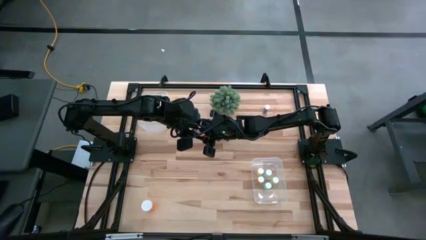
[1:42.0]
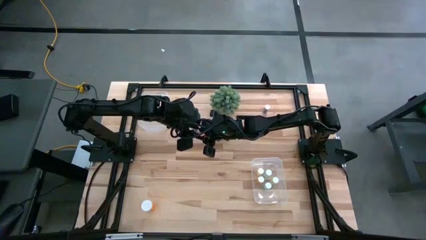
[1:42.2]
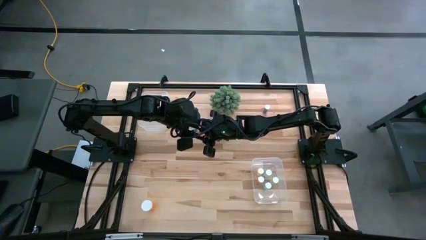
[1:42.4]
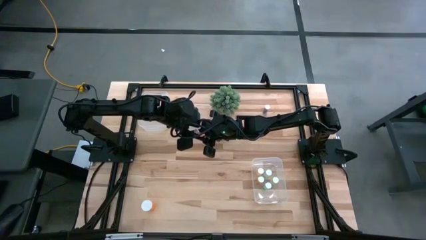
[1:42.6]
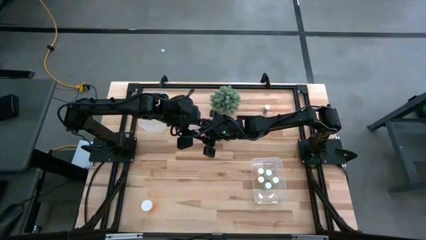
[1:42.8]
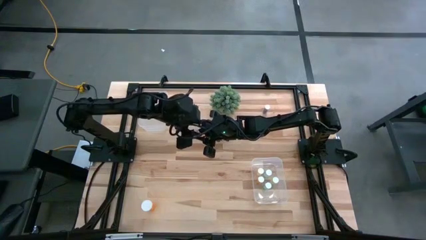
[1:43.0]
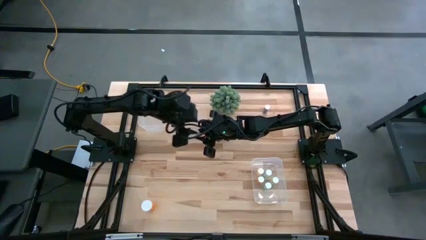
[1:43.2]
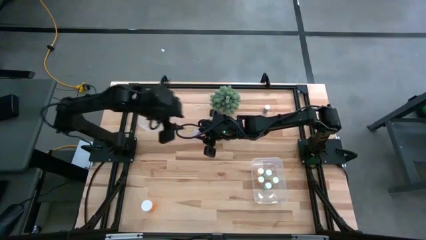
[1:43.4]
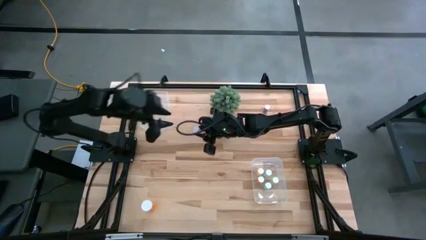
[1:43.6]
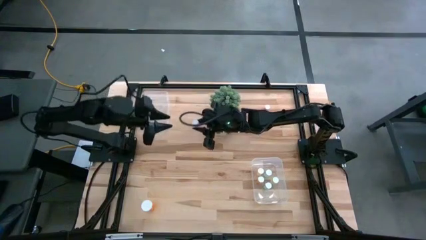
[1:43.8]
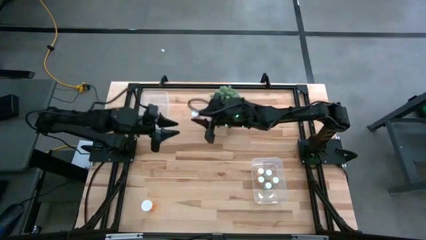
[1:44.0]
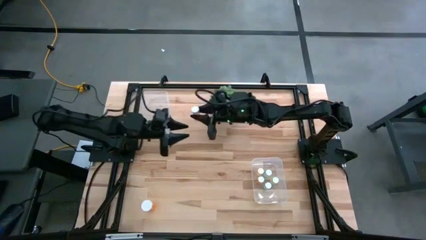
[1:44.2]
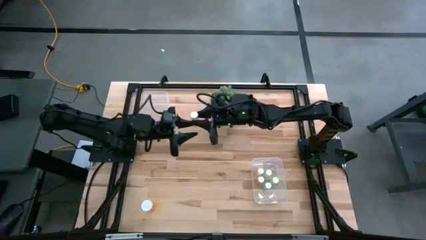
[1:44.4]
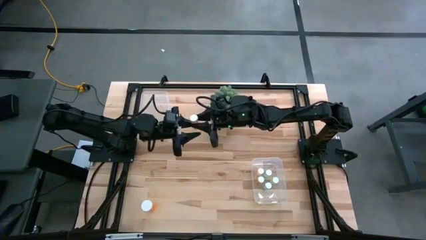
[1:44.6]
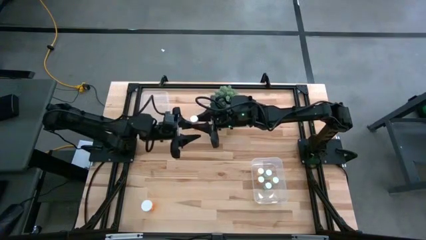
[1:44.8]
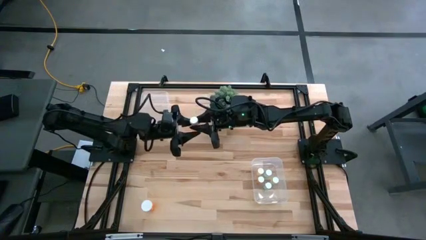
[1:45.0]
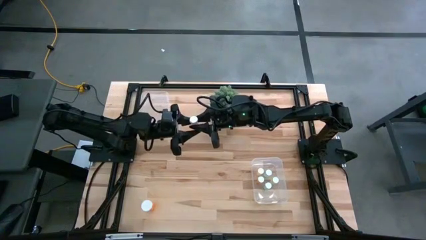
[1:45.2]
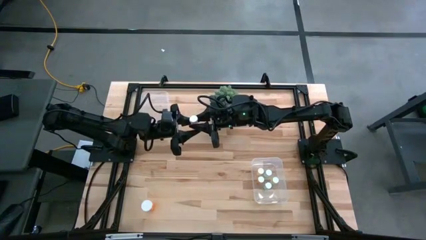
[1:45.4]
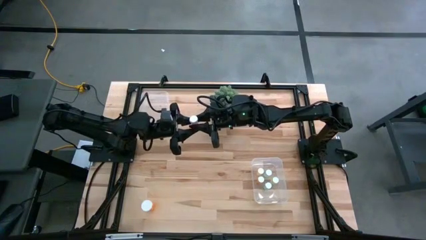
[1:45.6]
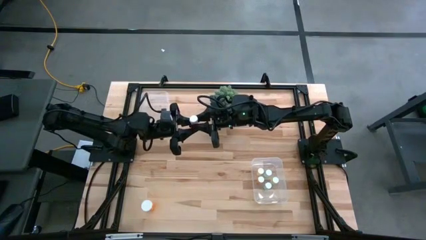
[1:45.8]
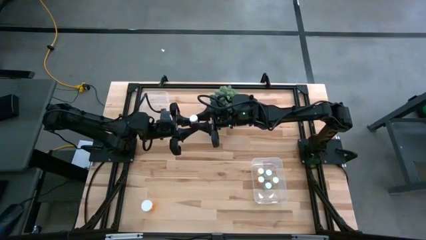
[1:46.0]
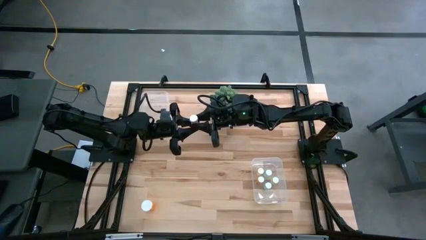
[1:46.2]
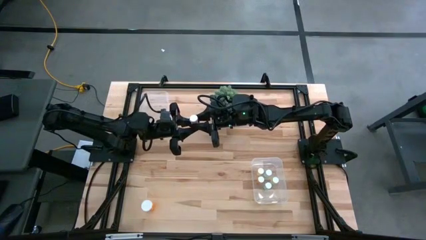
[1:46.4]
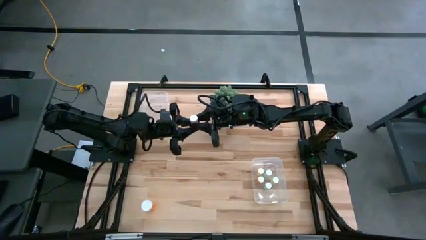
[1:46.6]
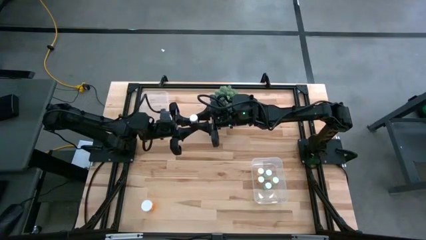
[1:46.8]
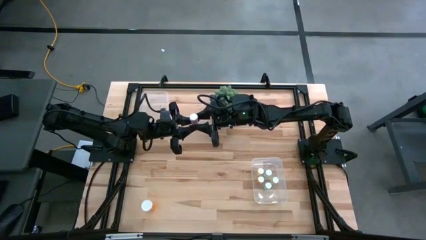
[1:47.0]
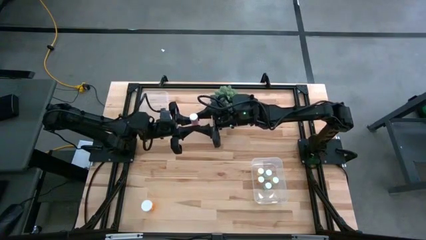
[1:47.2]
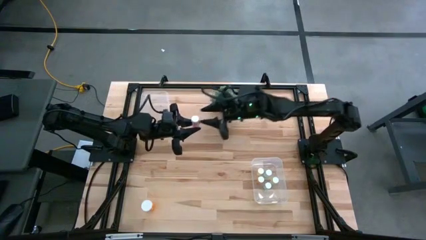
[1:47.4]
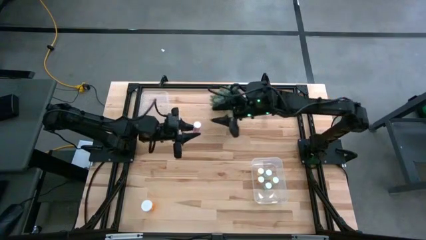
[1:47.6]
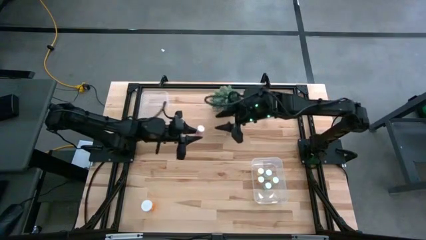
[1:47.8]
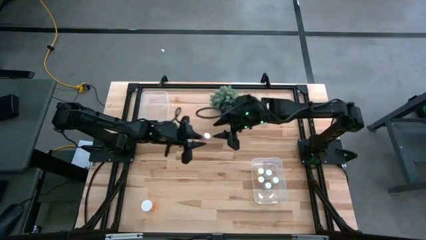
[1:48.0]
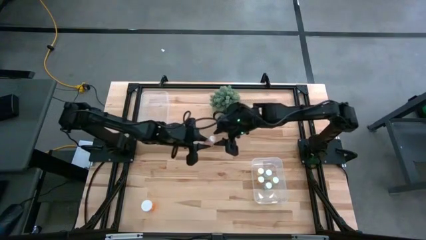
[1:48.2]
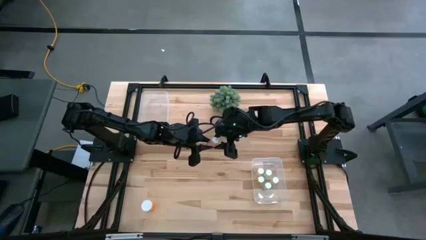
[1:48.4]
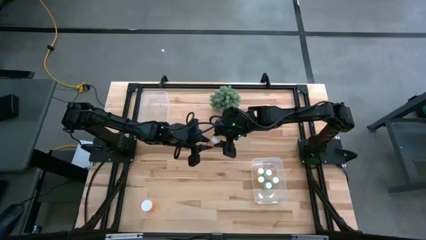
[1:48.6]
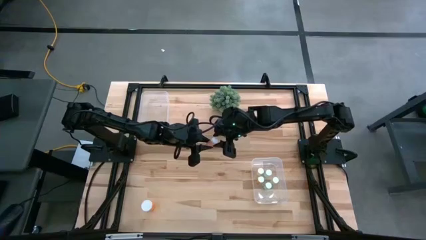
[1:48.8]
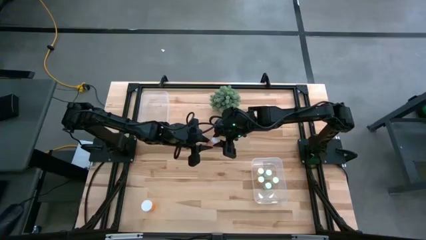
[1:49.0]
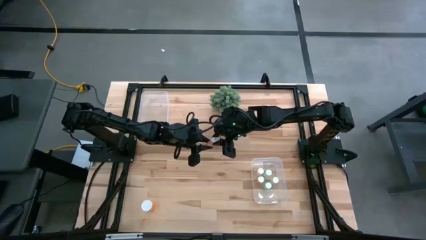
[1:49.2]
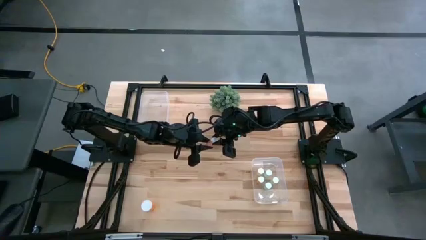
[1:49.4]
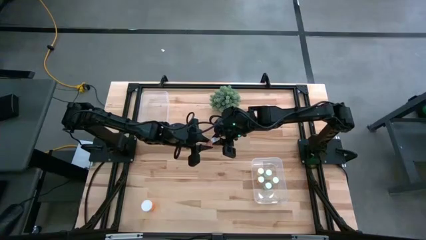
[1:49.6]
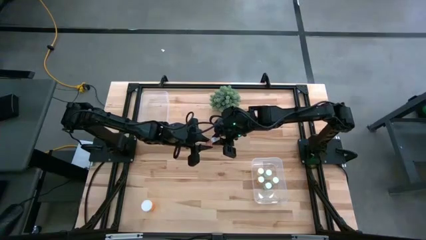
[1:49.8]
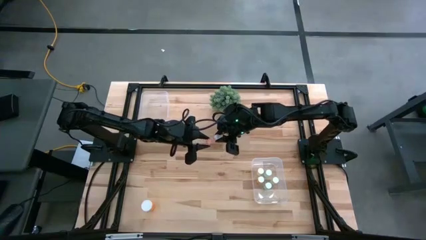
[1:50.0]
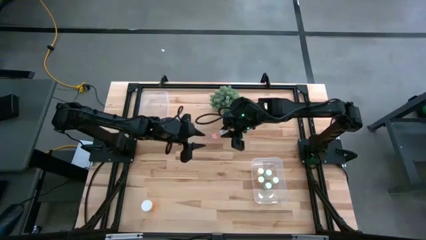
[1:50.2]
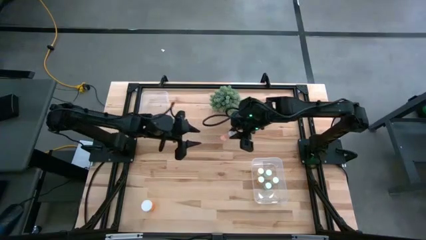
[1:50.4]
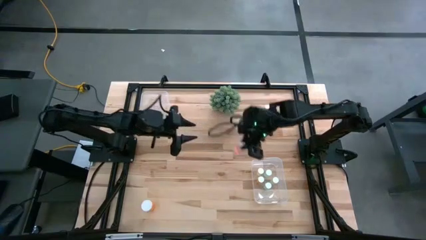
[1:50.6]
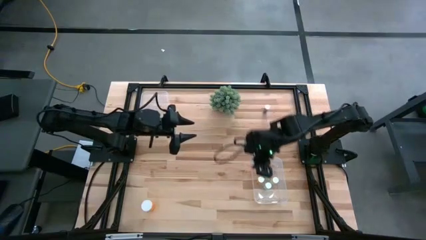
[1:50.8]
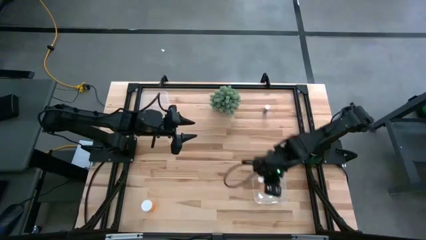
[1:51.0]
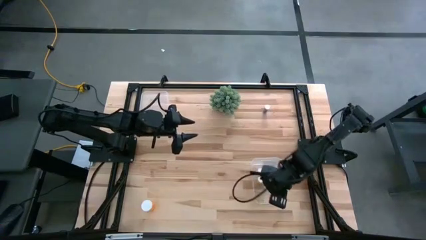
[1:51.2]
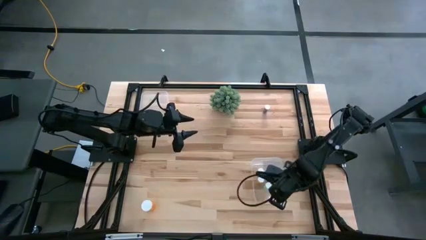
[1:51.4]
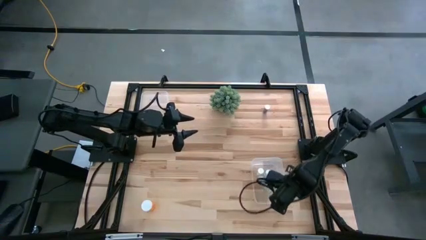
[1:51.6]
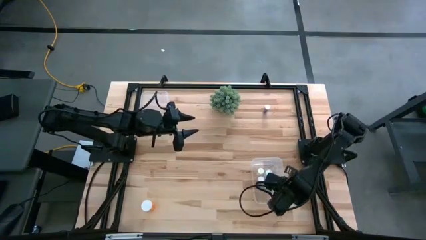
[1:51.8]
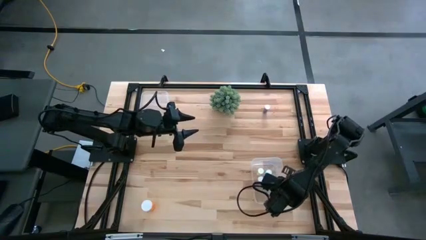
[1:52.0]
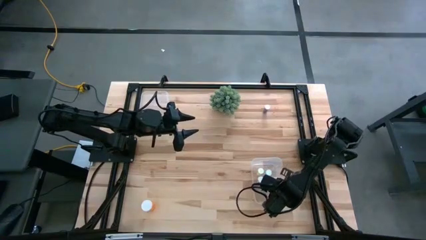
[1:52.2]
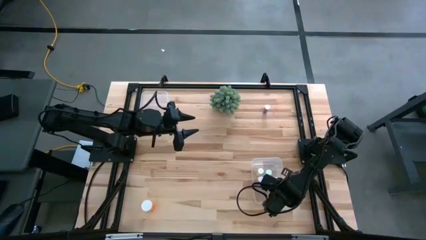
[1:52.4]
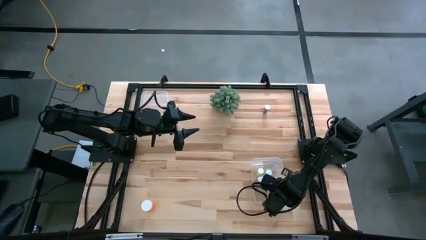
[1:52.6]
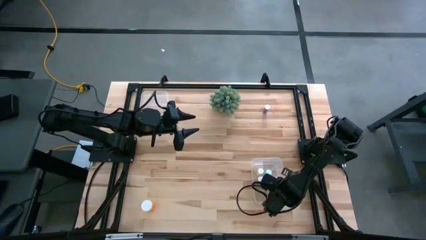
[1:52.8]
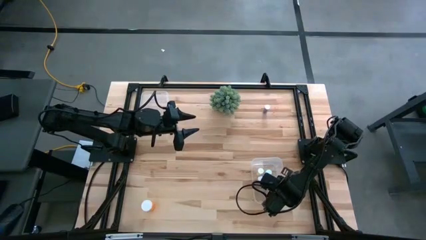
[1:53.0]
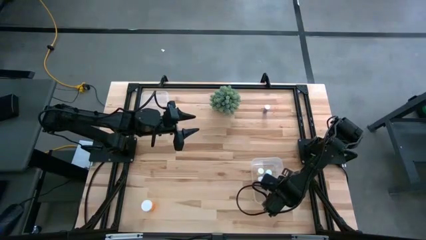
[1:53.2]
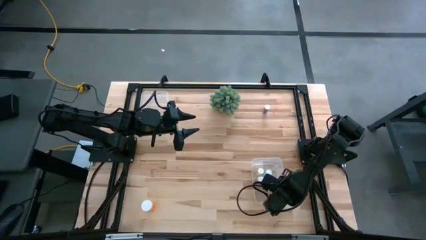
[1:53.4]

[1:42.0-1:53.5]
Task: Pick and place medicine bottles into bin by pill shape (circle, oval)
Put the pink tablet bottle into the right transparent bin

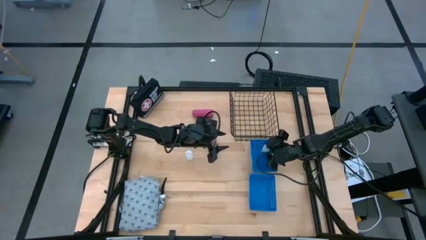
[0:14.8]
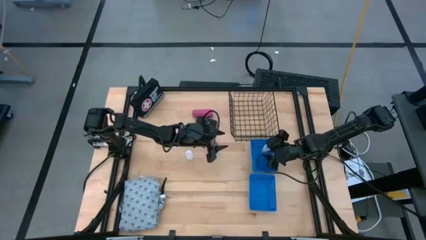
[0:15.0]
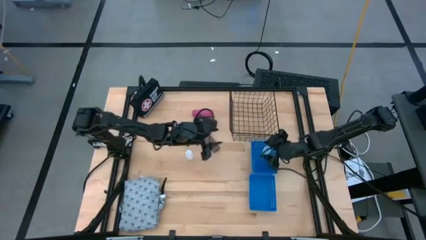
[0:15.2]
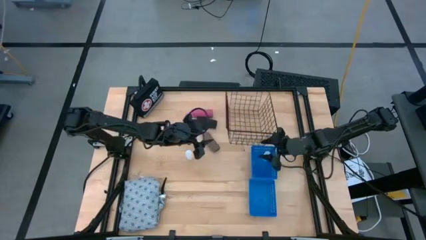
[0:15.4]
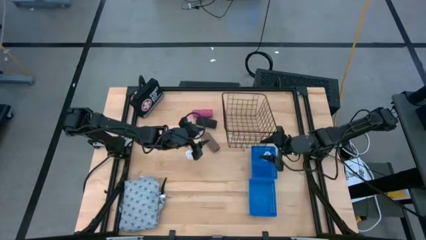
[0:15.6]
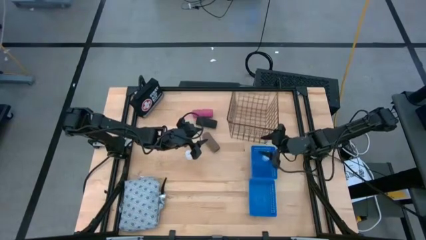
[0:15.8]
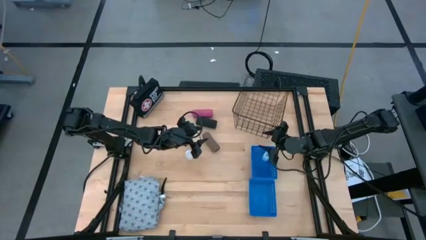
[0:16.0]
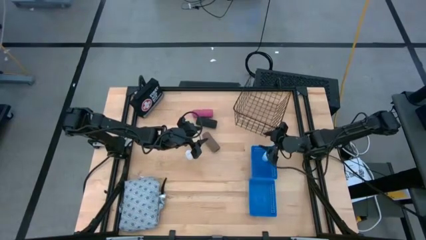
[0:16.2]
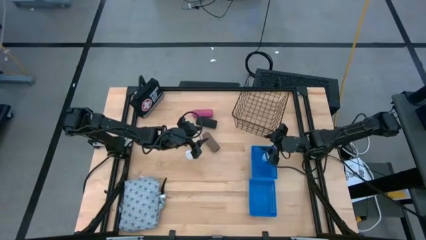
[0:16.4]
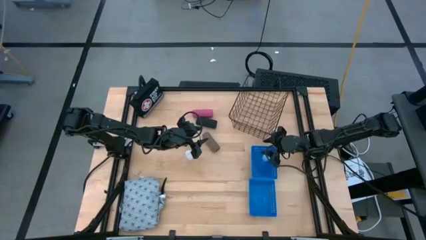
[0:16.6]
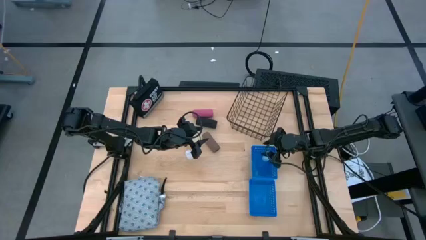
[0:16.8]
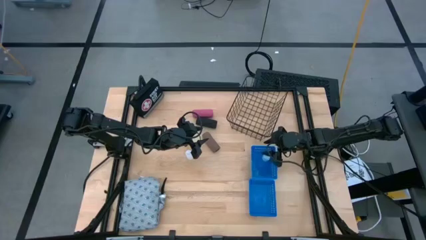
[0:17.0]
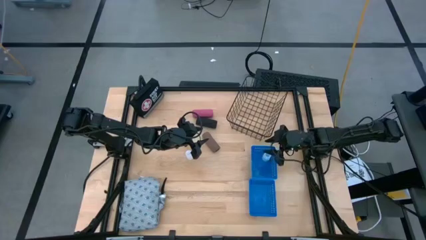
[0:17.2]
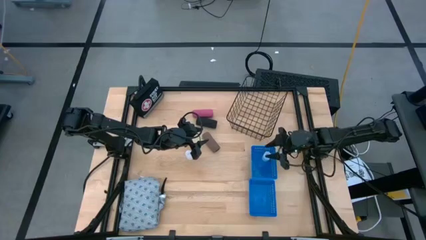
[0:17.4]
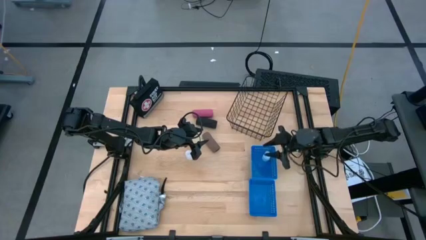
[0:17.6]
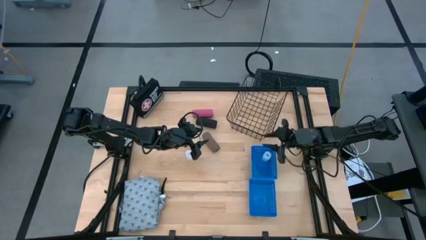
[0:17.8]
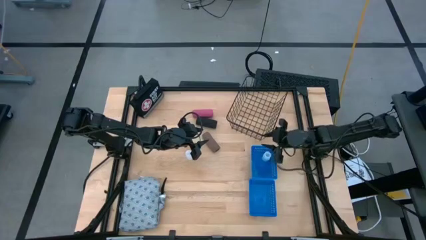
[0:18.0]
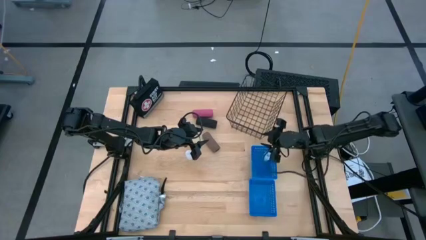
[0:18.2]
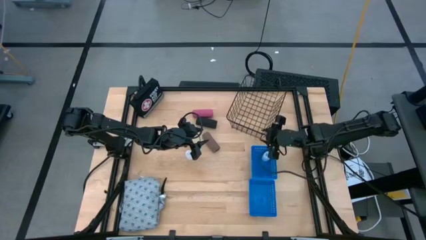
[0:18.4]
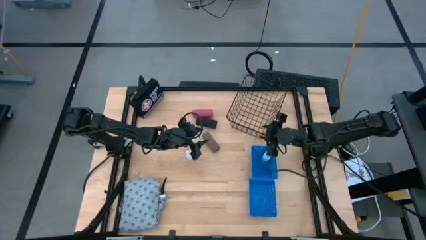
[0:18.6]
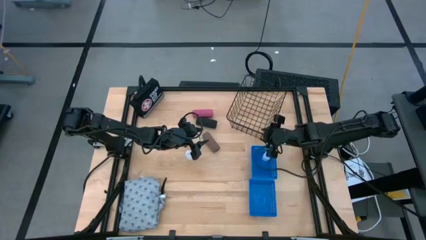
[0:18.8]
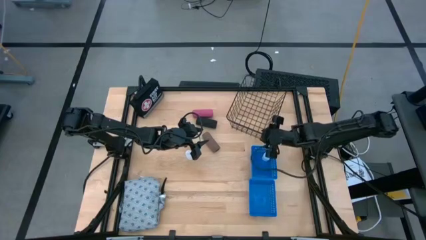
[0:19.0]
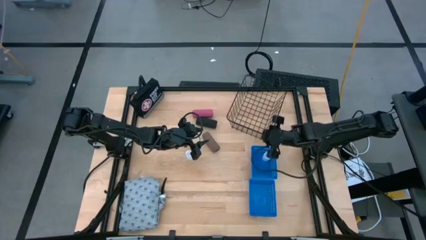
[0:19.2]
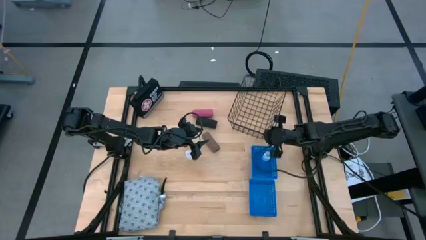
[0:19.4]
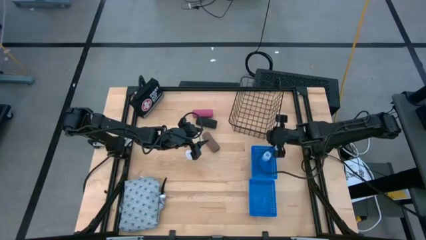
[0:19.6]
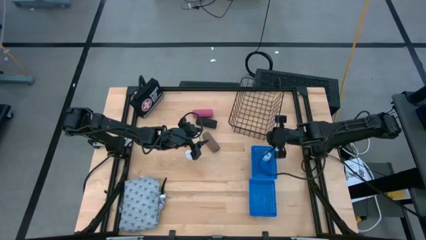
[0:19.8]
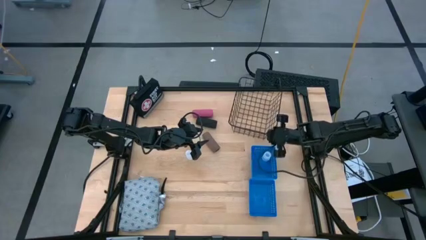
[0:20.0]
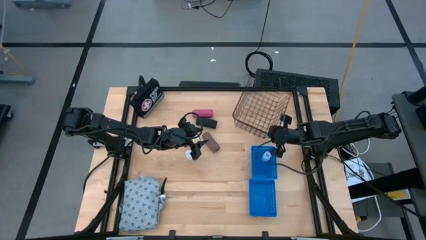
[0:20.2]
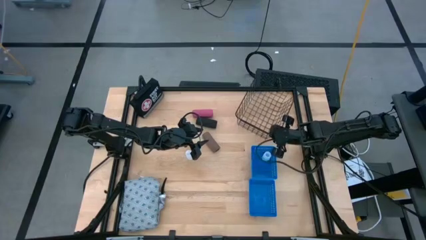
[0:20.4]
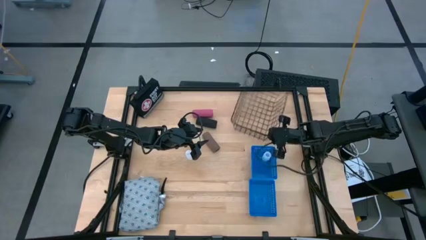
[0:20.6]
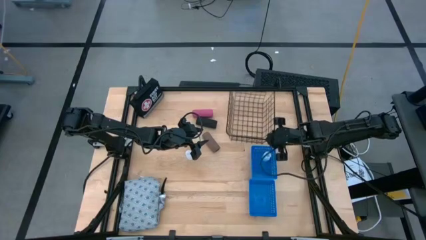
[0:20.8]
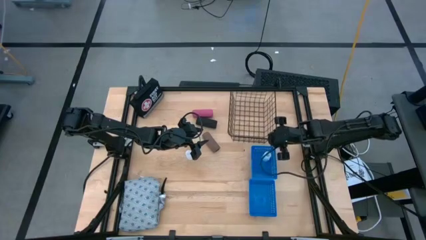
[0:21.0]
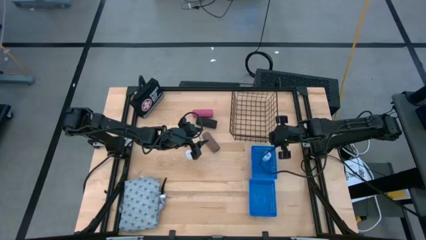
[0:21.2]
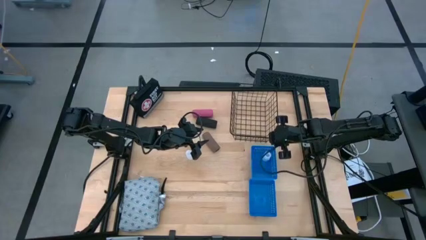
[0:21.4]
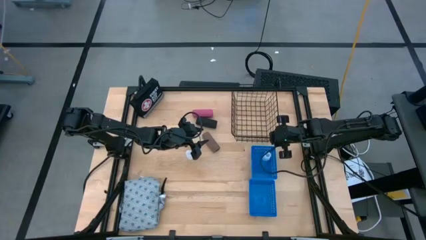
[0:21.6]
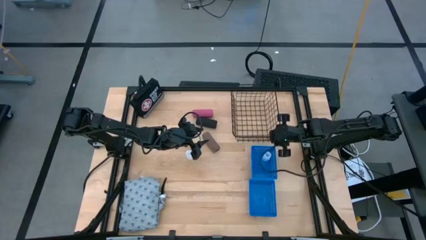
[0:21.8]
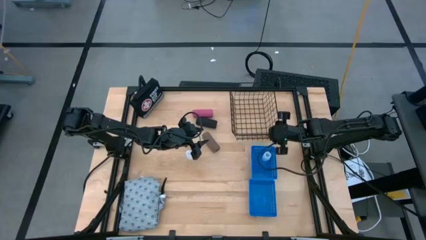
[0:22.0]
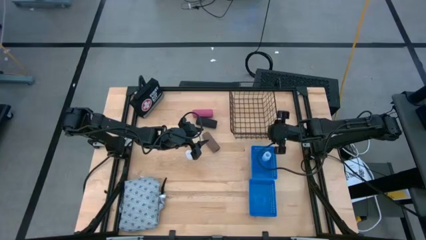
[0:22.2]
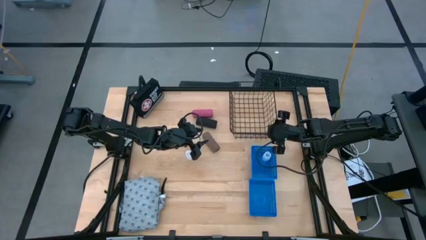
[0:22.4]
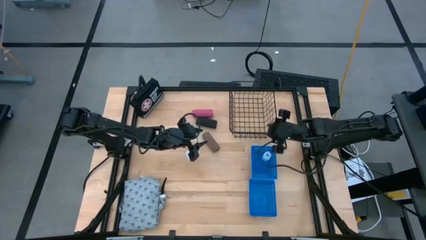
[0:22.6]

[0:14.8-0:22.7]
Task: Pick & Place Medicine items
Adjust the wire basket
